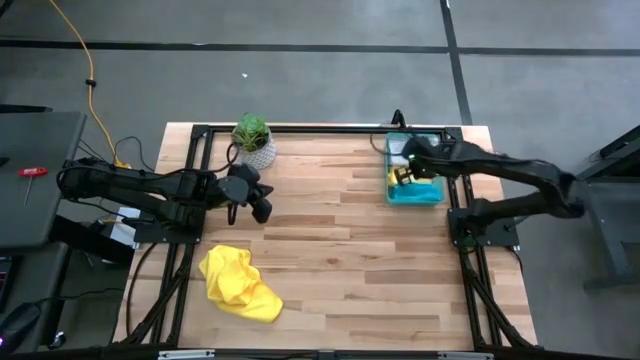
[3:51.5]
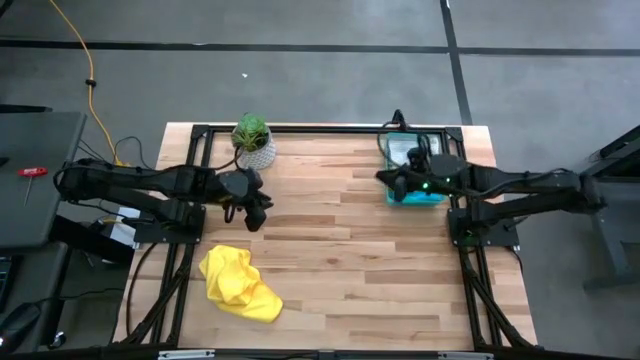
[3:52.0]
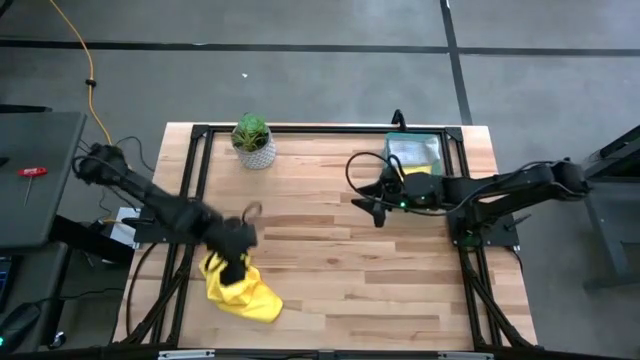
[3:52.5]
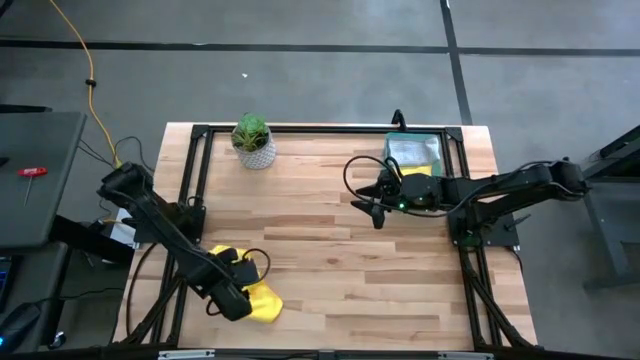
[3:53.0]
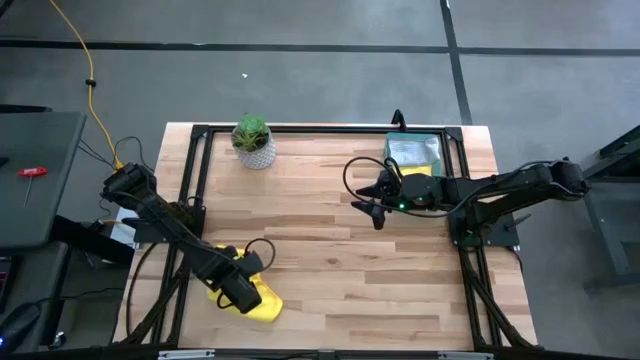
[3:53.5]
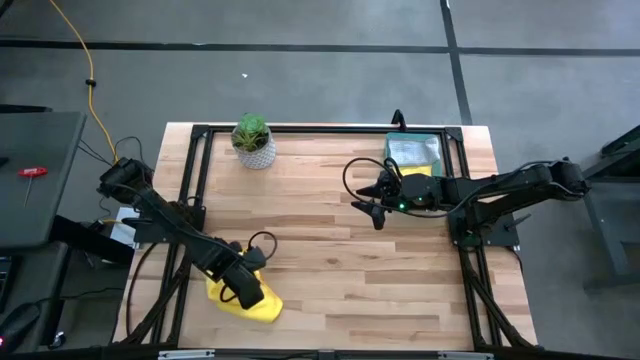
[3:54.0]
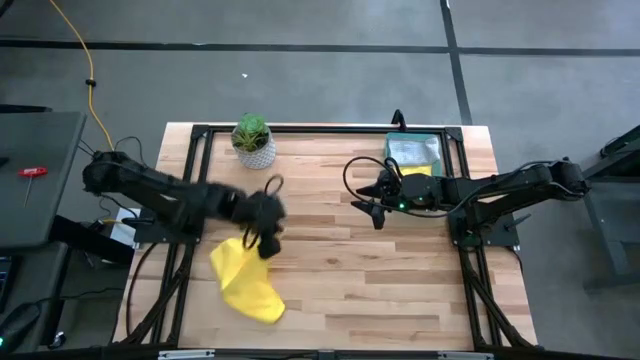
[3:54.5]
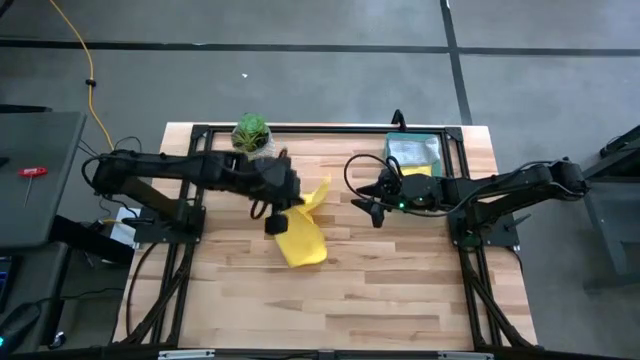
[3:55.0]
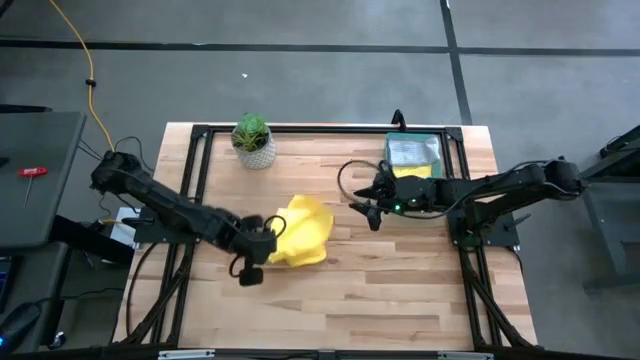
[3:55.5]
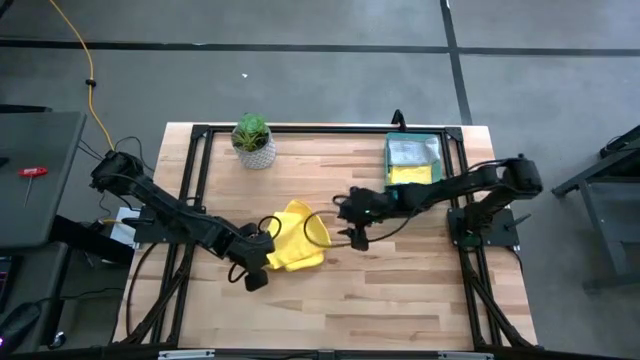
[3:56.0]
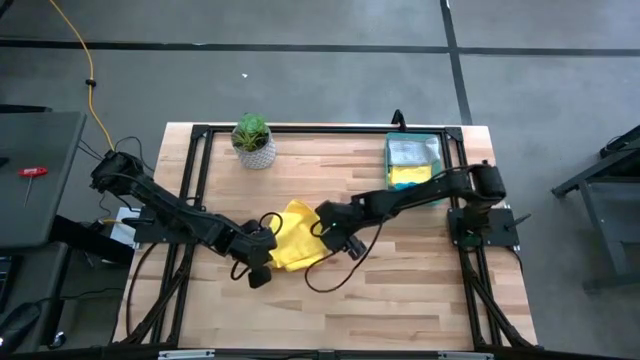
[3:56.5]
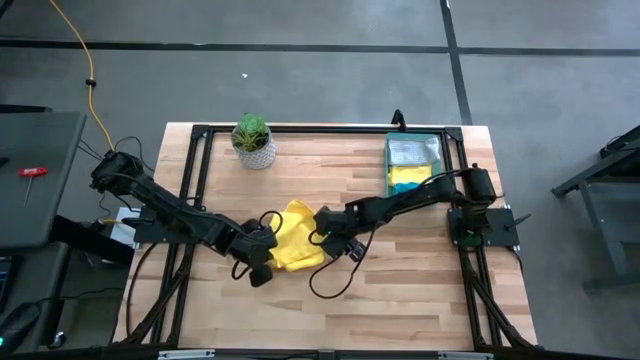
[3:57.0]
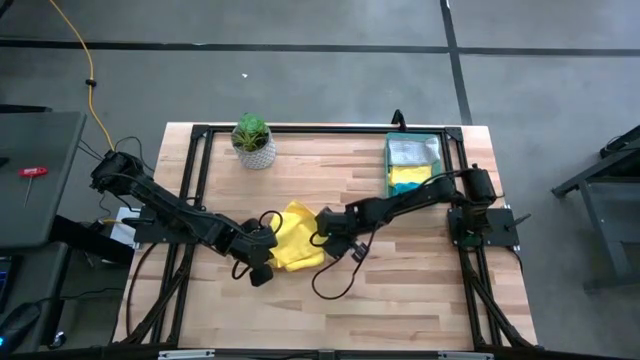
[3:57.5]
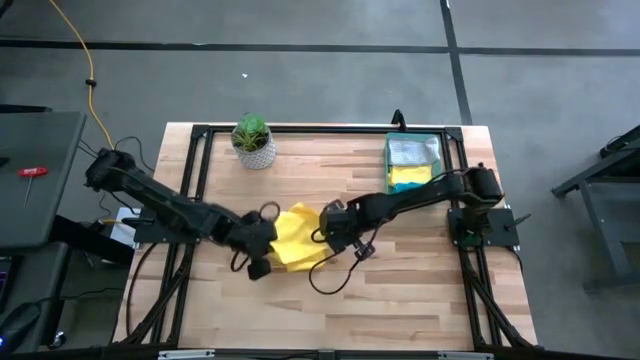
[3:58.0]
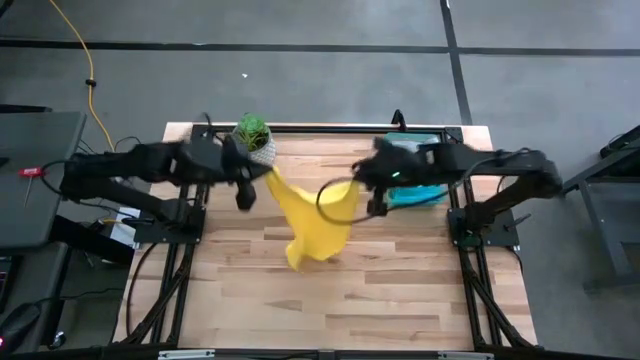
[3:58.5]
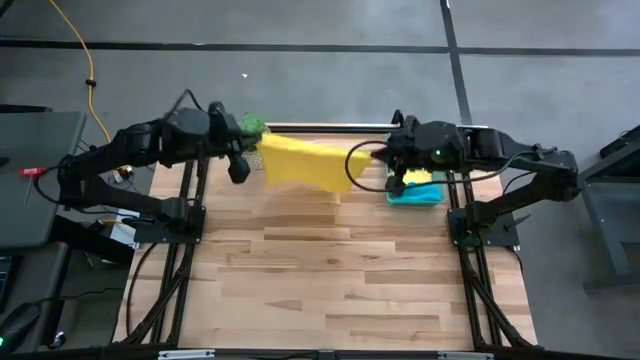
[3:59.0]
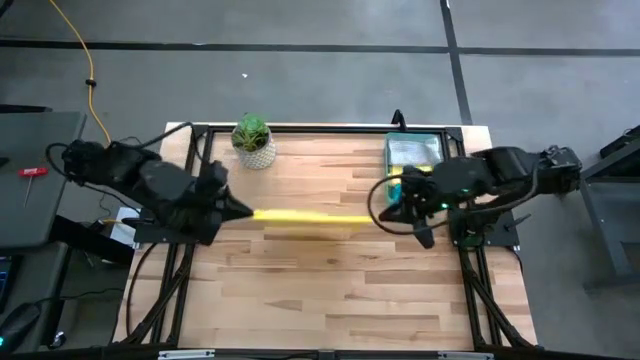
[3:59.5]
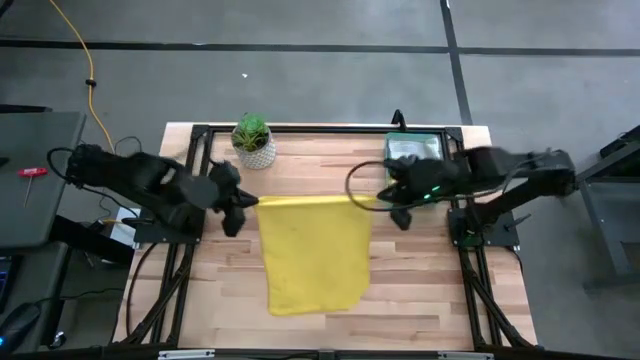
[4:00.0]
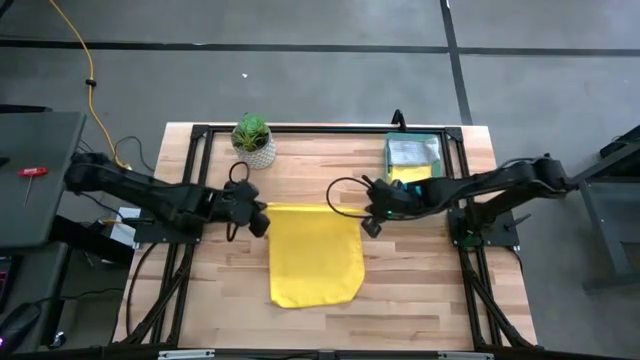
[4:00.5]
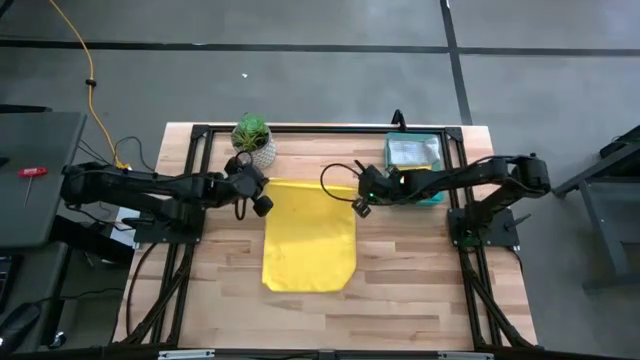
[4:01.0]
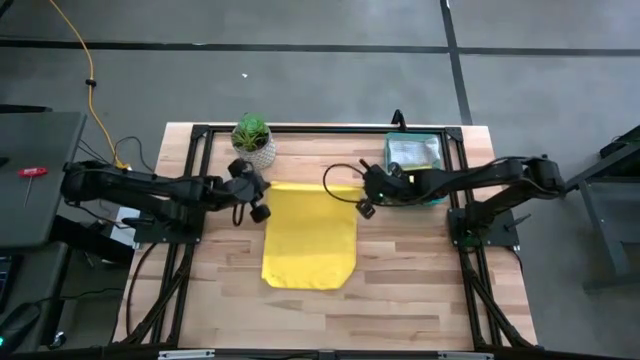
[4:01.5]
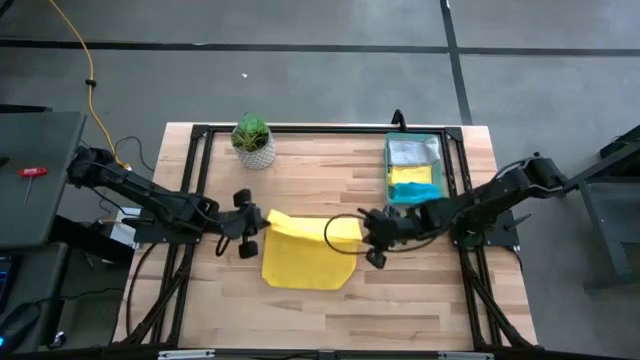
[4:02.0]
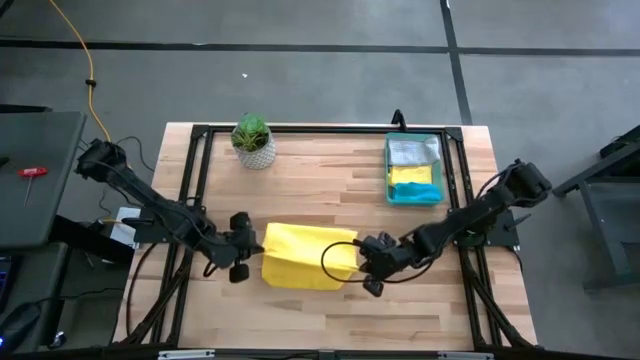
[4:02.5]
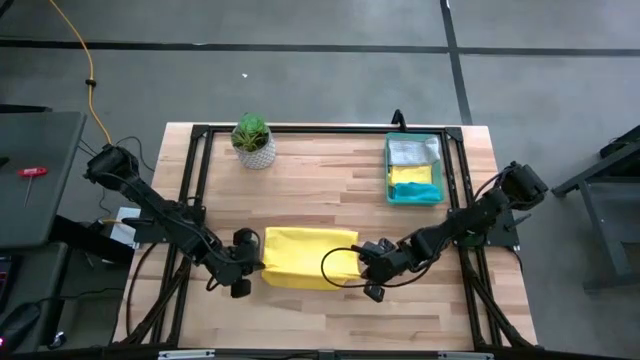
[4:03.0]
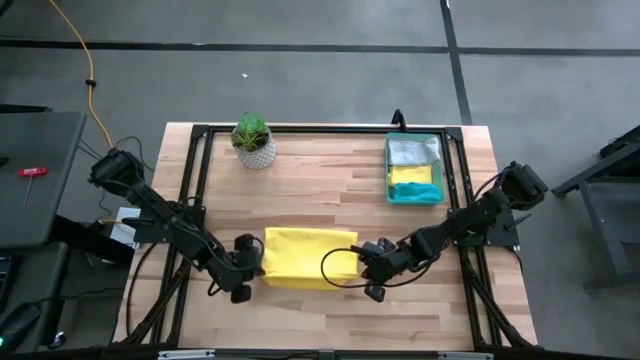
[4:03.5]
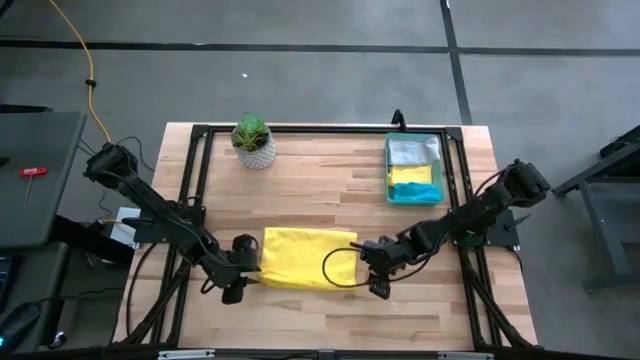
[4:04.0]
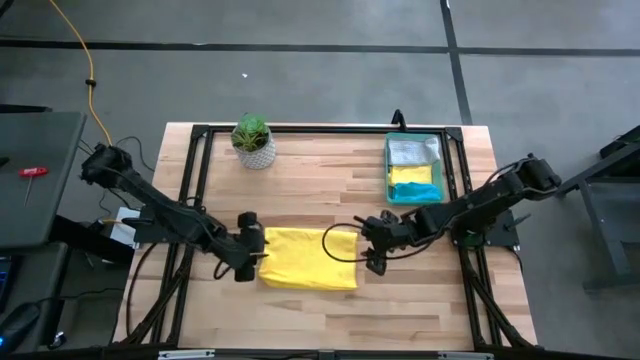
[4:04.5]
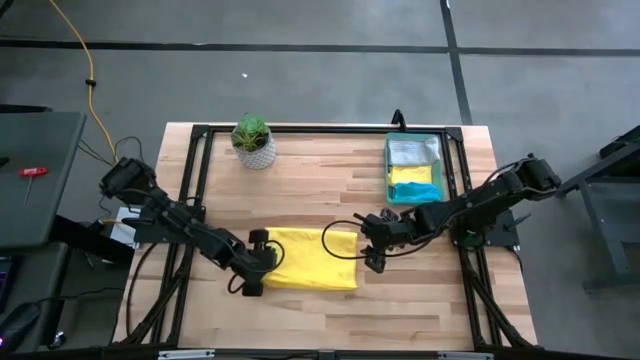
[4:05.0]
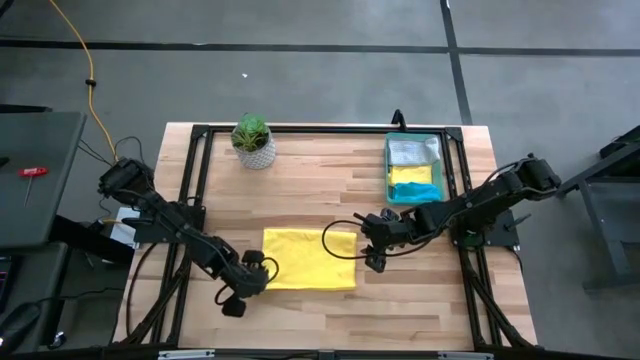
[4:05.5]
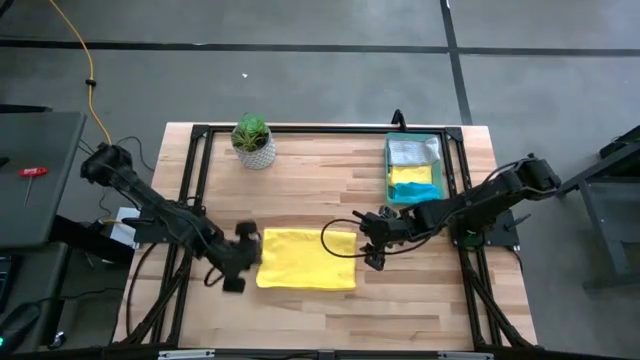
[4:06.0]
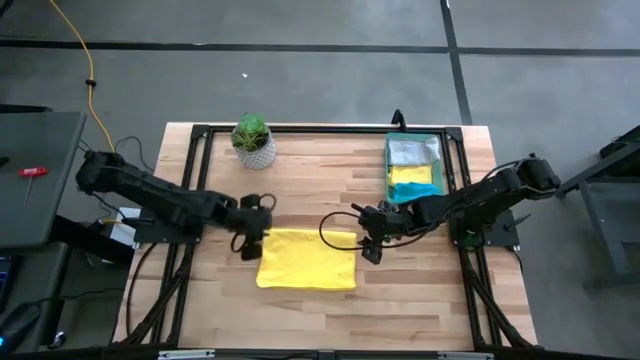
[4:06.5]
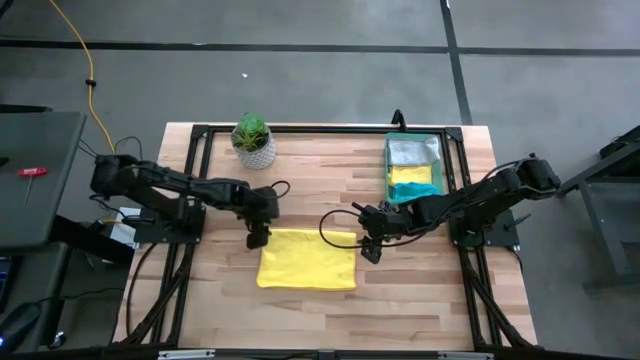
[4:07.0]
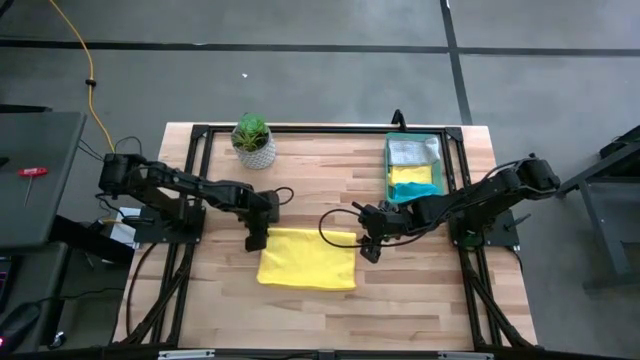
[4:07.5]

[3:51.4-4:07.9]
Task: Fold microfiber towels
Fold the yellow microfiber cloth

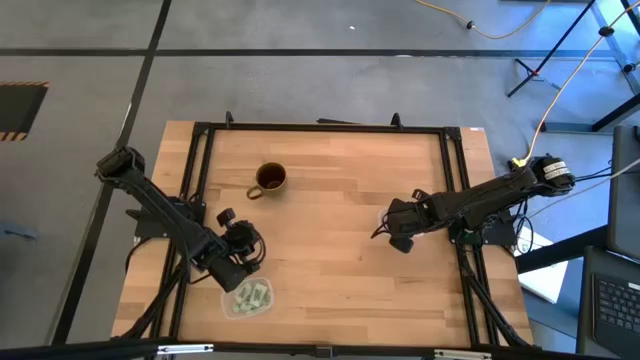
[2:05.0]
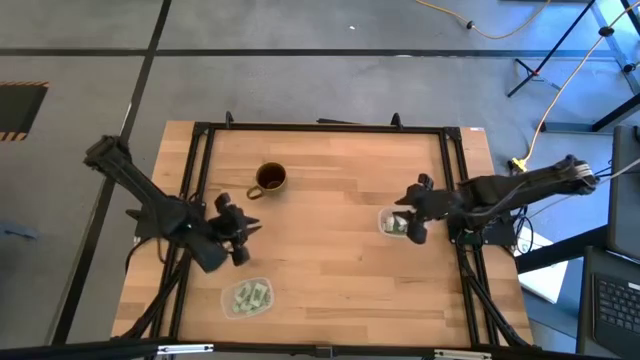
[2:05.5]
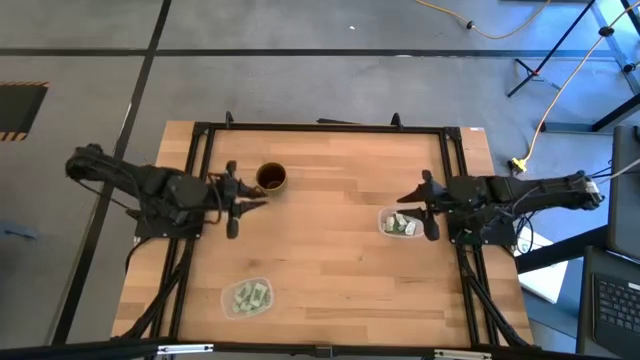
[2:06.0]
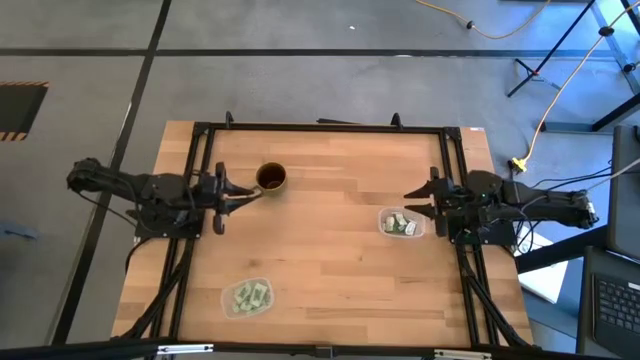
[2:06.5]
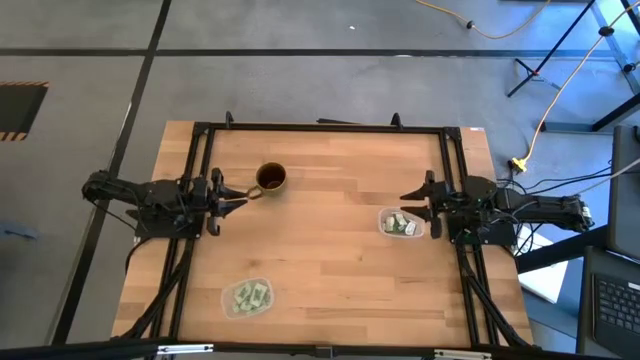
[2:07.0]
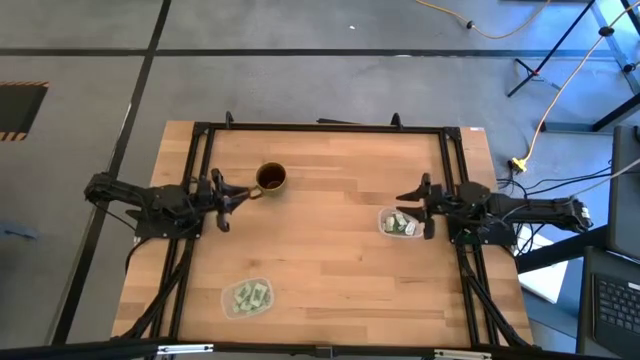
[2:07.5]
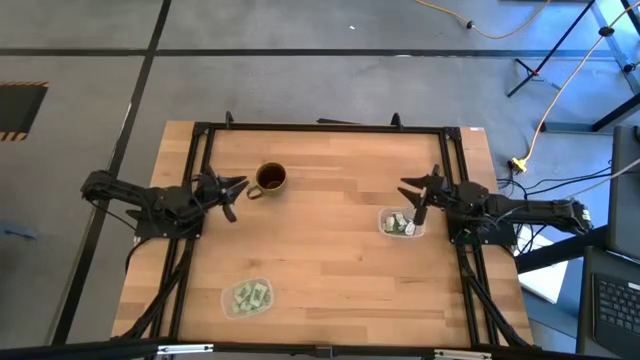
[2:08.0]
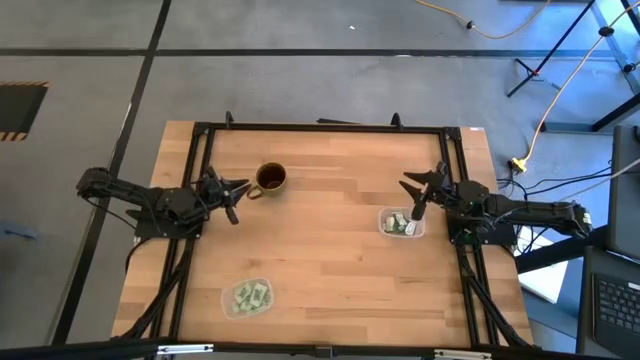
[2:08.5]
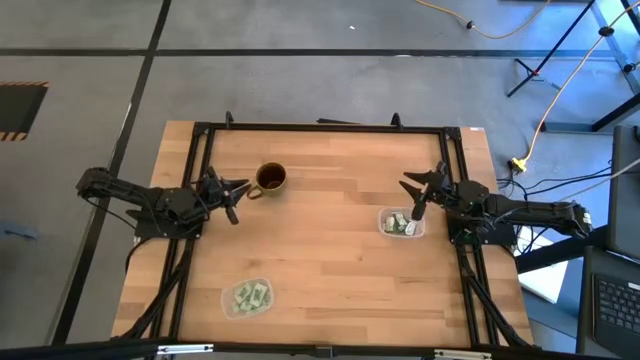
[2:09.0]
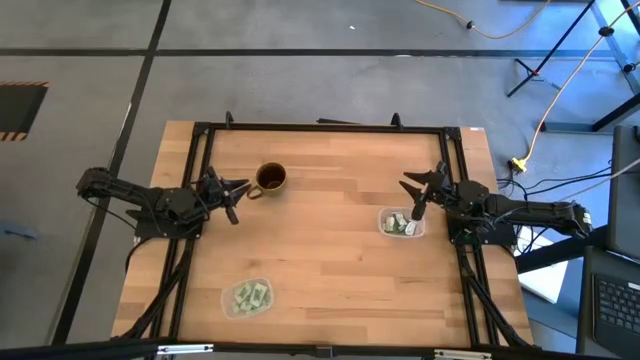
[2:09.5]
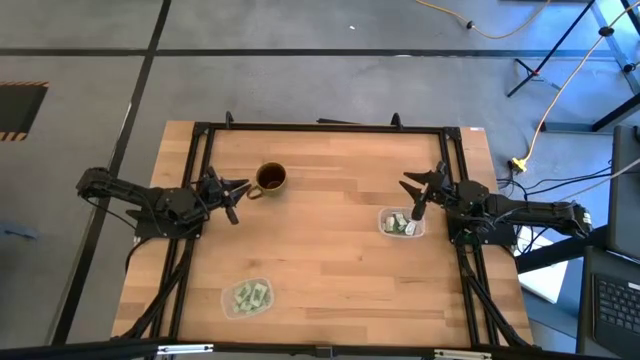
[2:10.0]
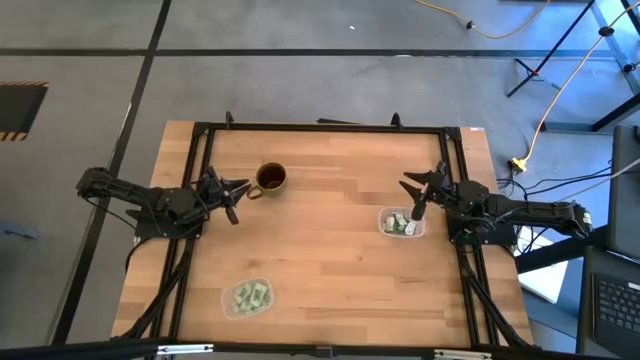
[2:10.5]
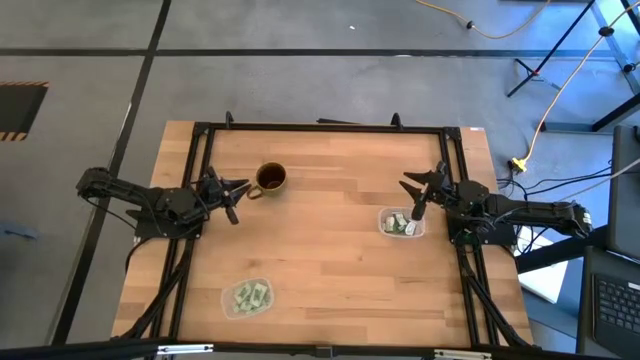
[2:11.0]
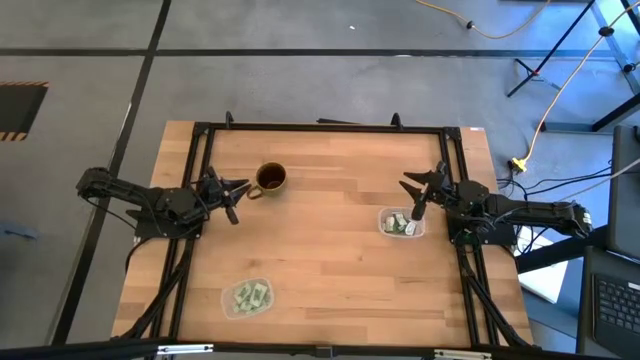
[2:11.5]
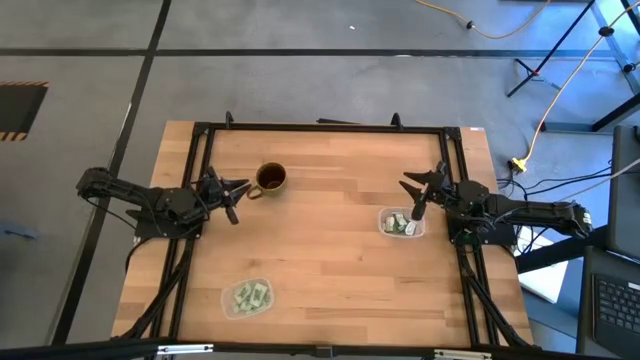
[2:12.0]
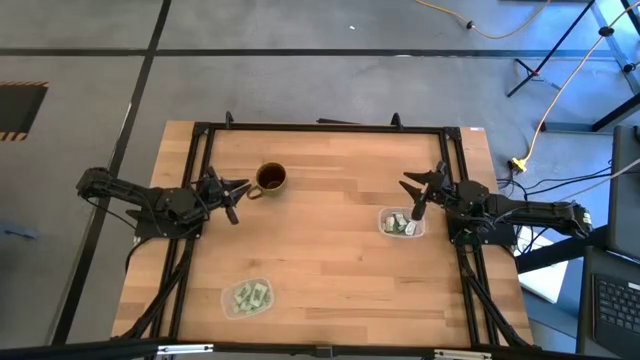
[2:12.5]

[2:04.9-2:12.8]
Task: Pick and place Stevia / Truvia into bins
Return to Home Position
